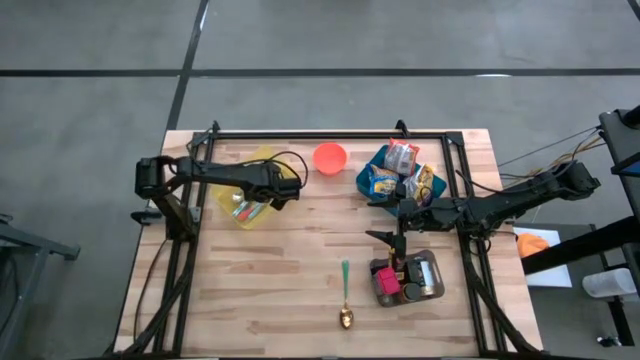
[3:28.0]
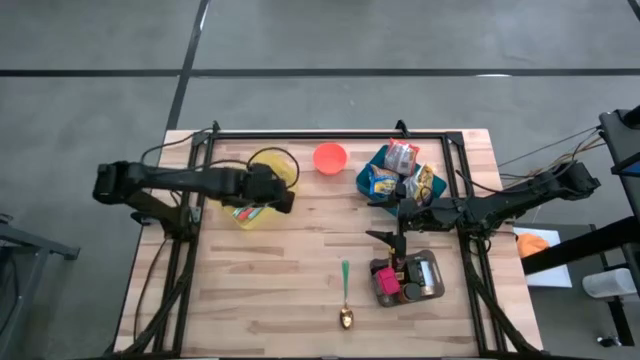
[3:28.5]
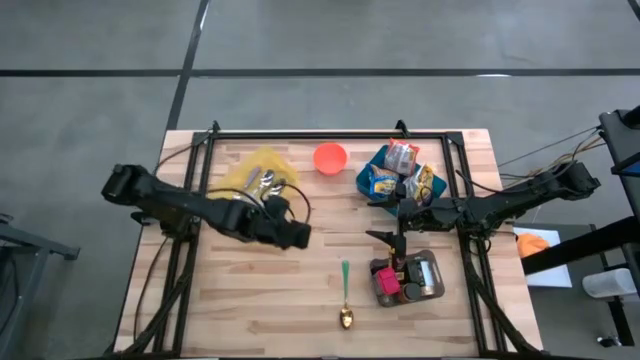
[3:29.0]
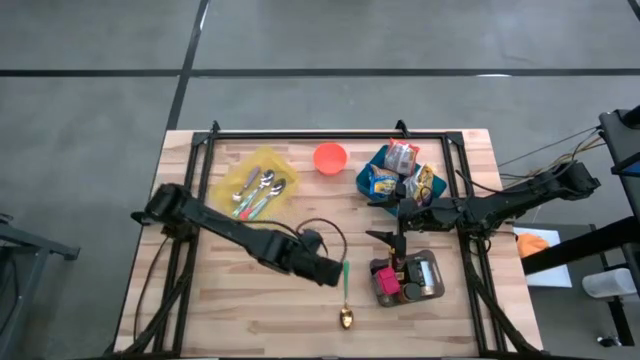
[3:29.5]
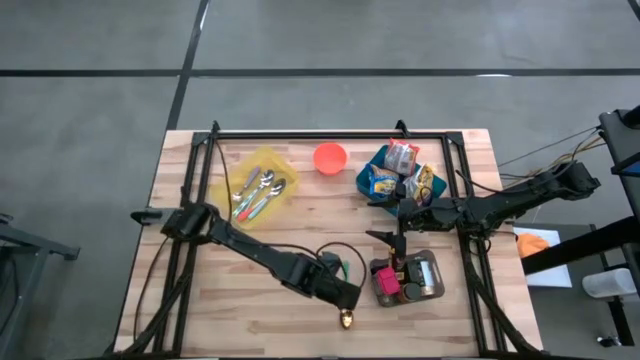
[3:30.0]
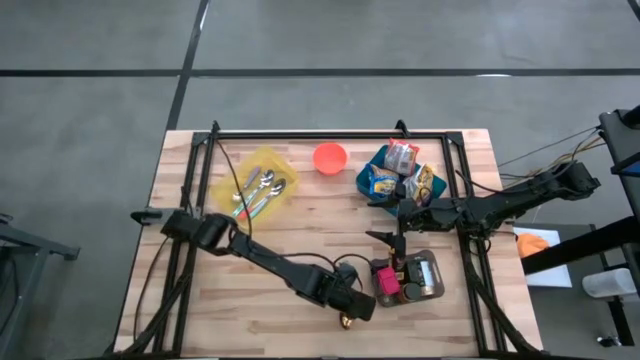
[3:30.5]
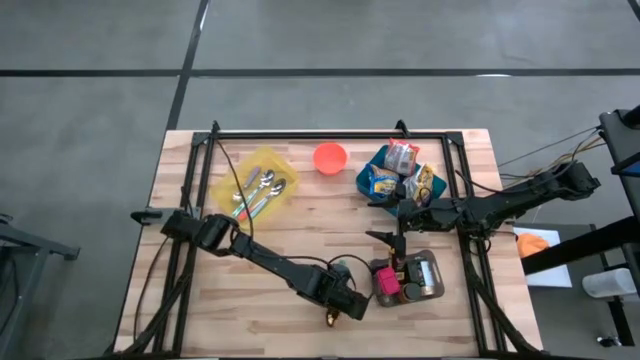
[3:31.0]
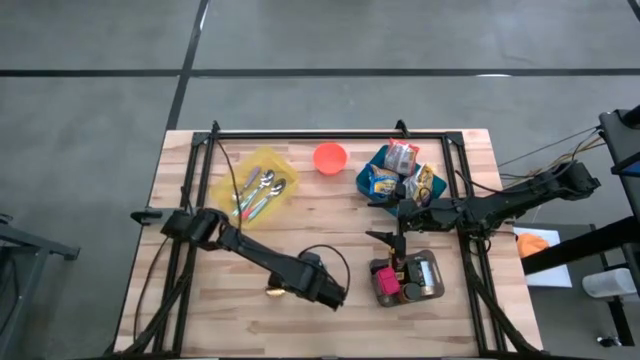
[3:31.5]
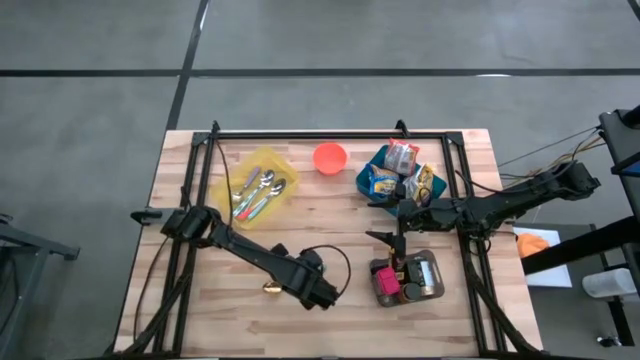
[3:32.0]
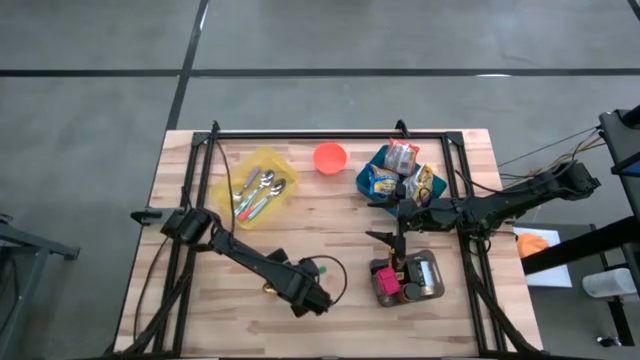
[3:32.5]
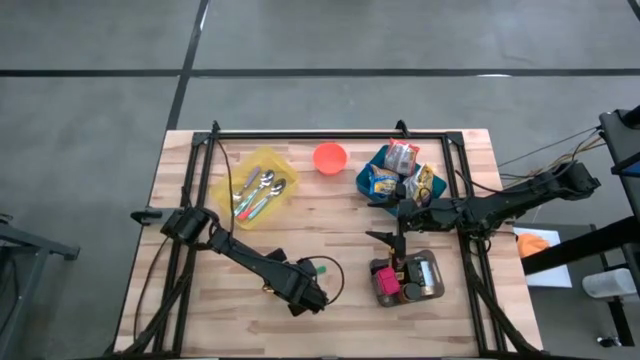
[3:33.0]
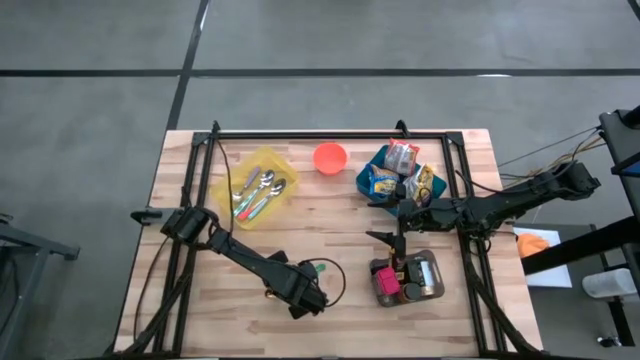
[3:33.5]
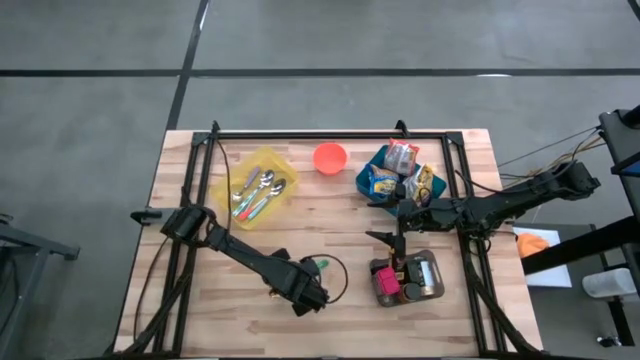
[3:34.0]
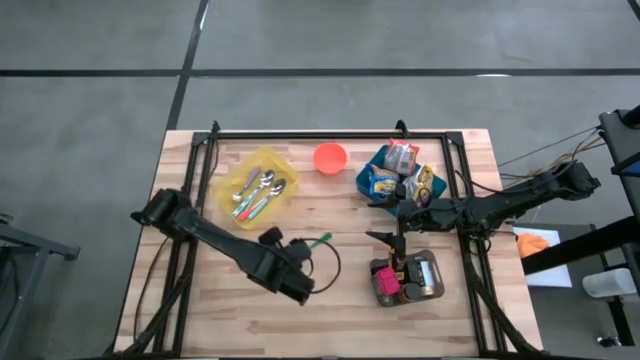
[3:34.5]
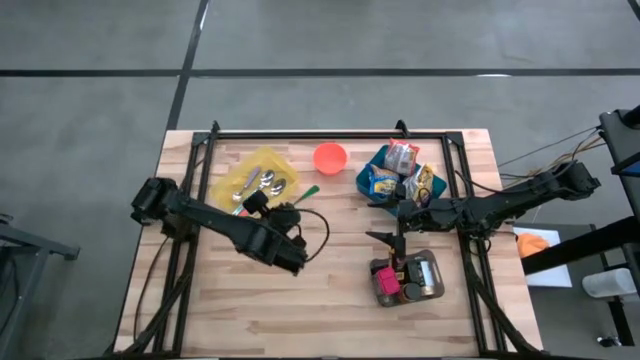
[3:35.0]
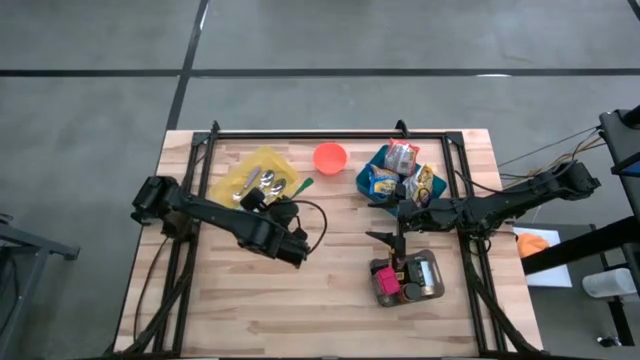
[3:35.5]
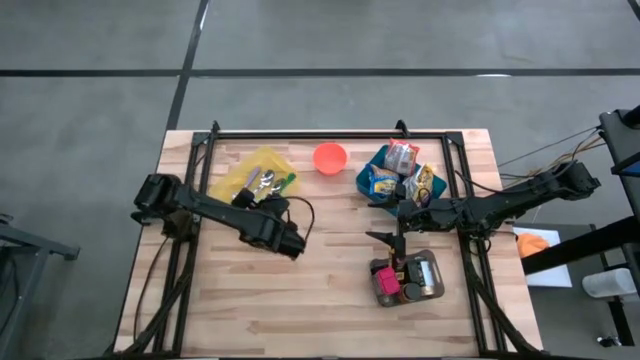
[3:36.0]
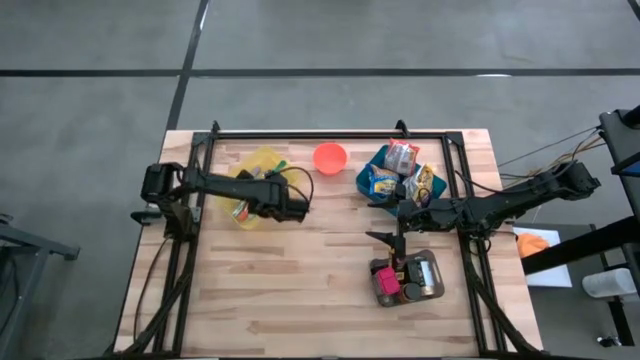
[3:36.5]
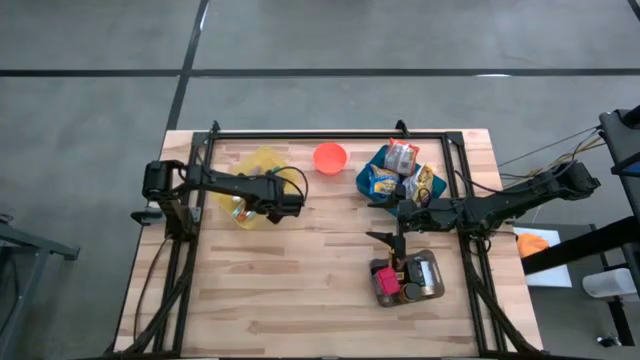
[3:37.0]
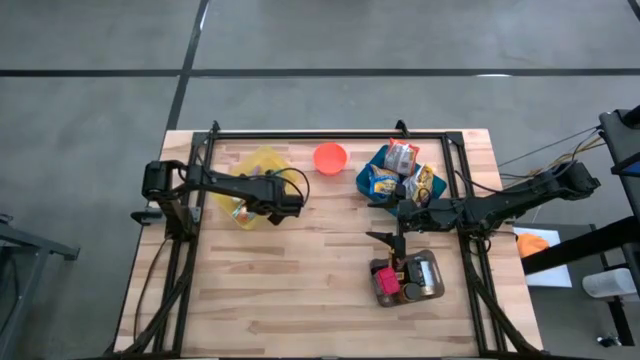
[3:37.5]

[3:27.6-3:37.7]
Put the green spoon into the yellow bin

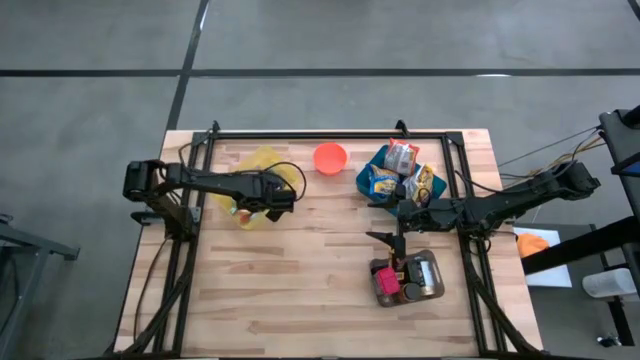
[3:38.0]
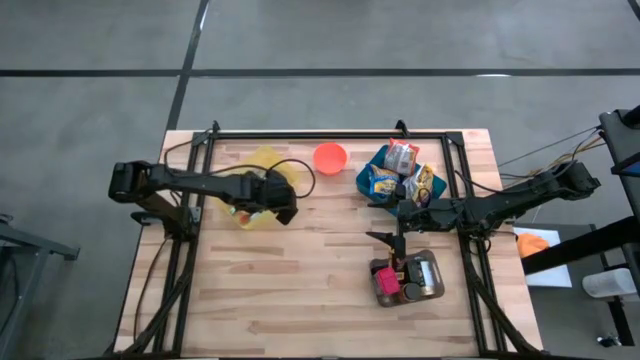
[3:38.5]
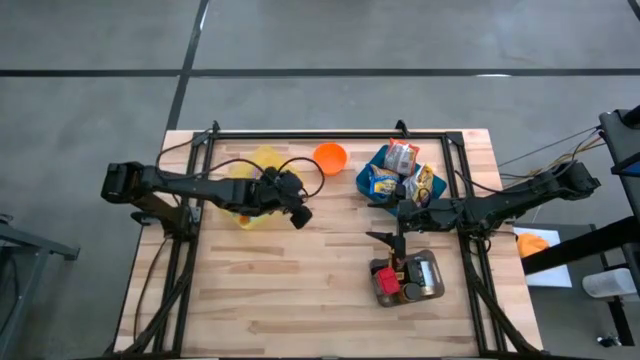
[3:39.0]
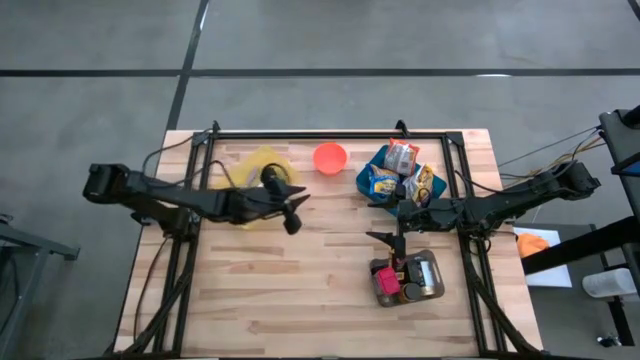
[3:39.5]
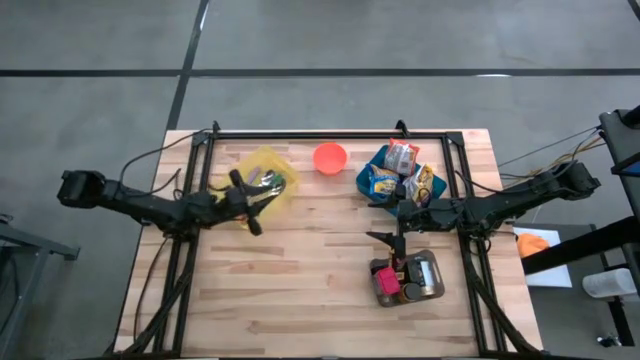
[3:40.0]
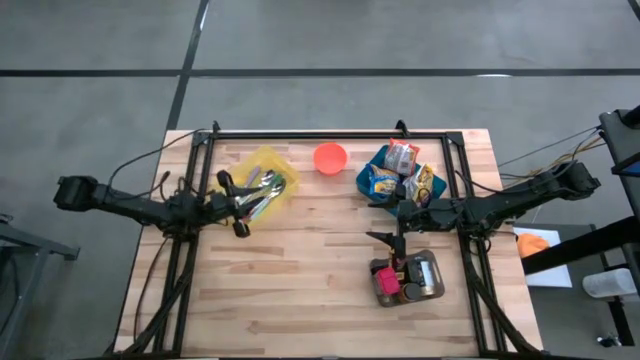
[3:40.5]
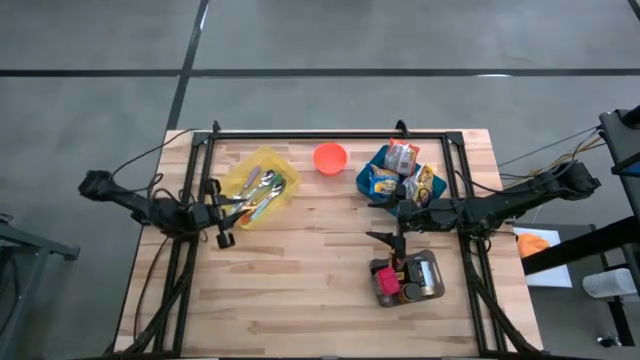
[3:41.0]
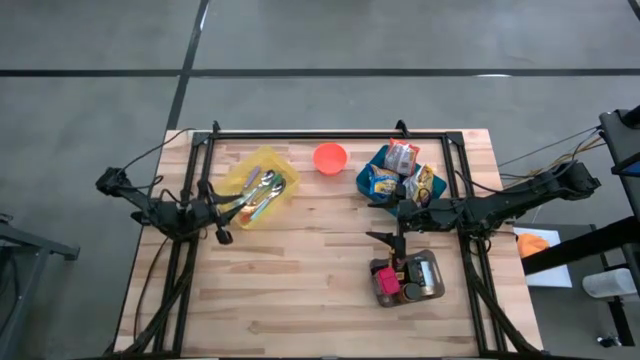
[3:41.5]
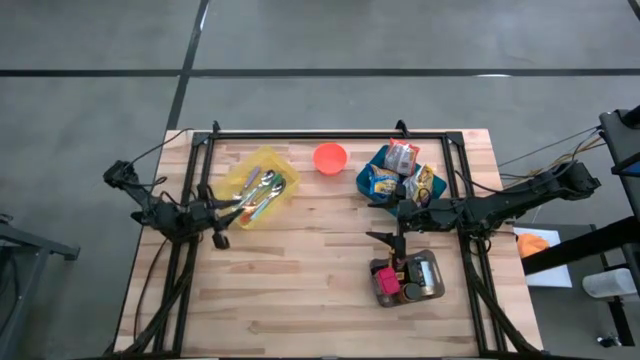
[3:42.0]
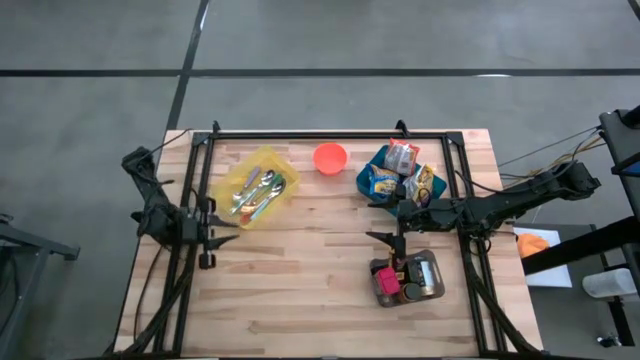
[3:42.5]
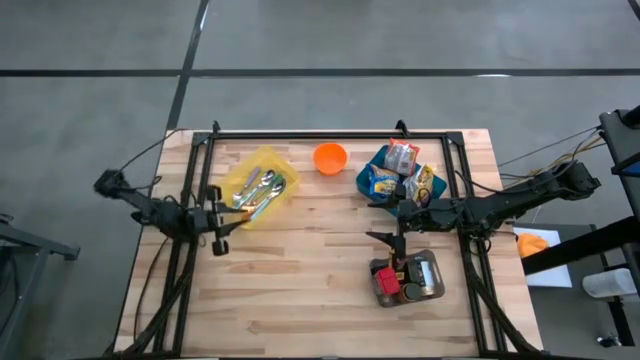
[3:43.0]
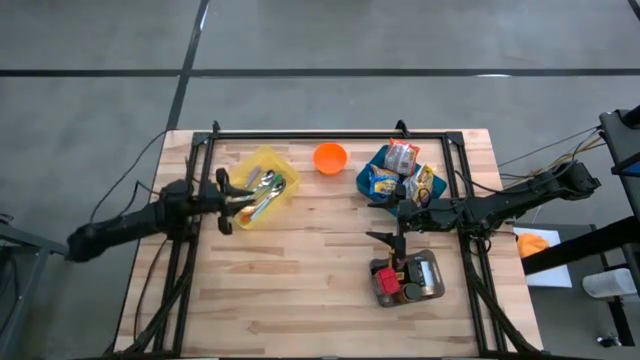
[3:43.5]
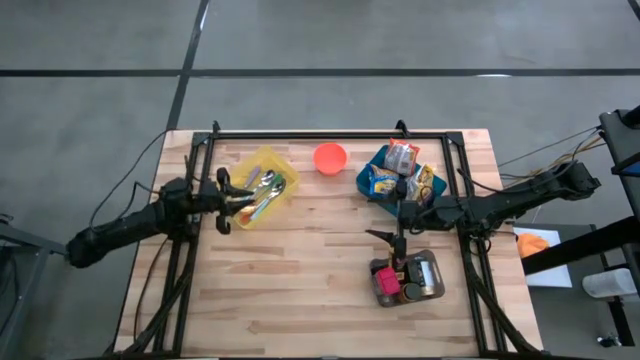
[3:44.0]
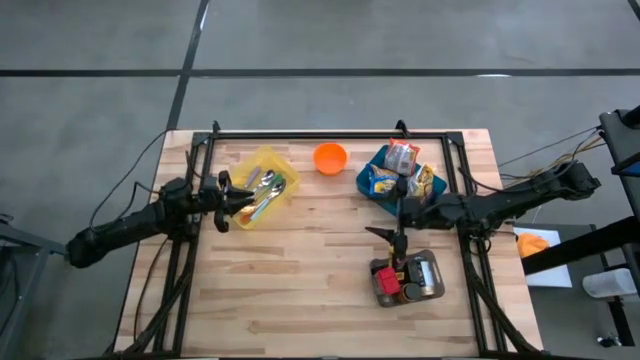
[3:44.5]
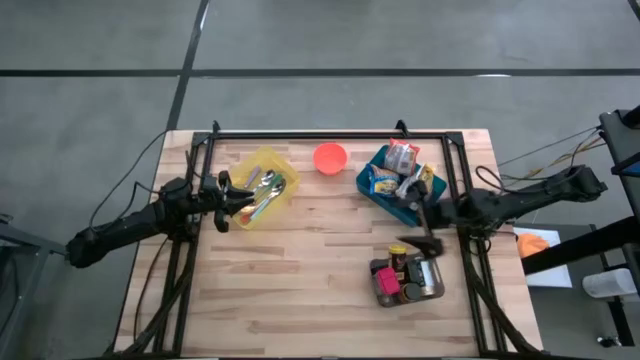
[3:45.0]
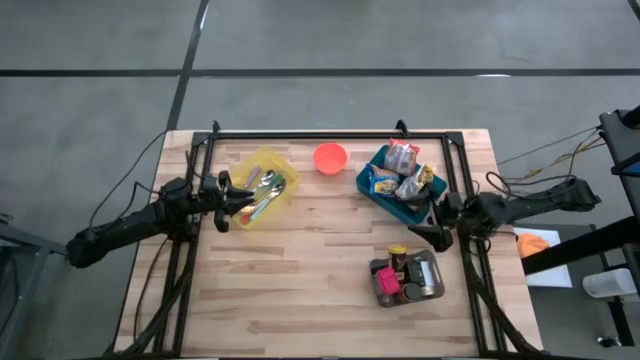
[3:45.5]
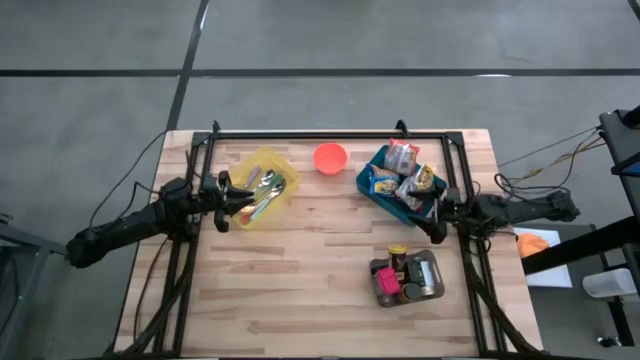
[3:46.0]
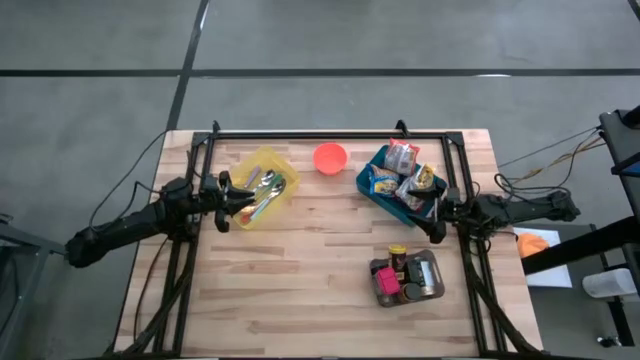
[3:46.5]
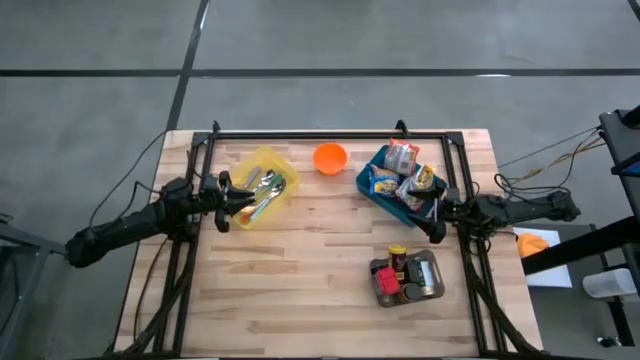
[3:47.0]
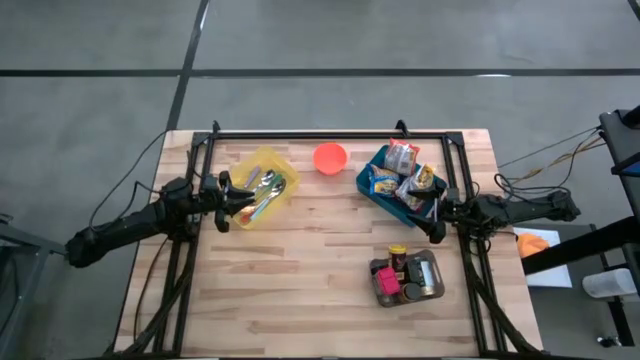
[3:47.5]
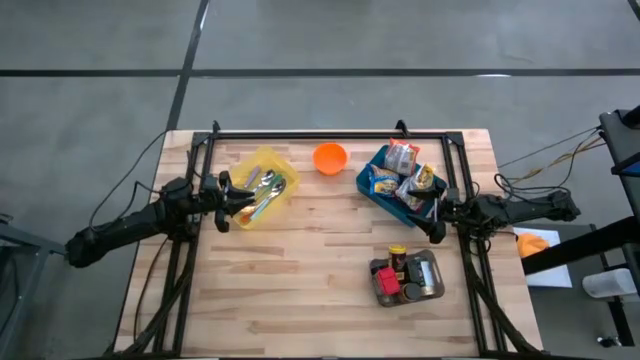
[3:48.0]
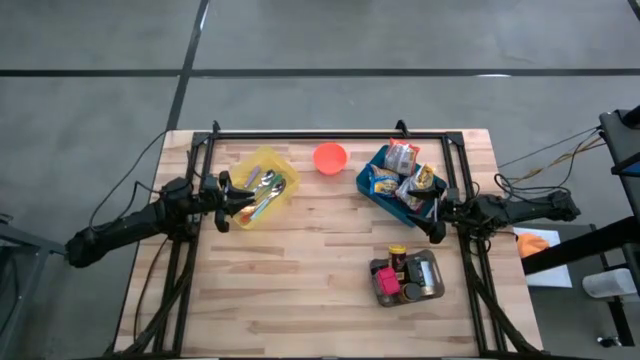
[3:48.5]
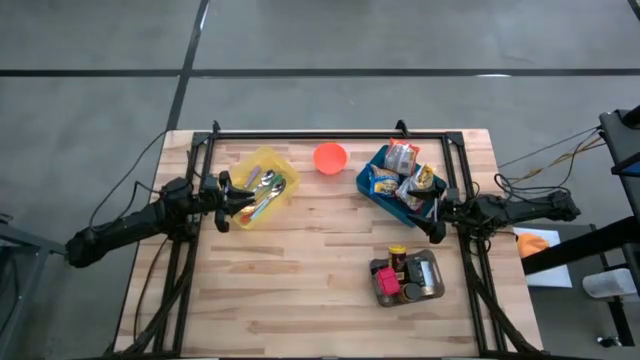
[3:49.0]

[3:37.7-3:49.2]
Return to Home Position
